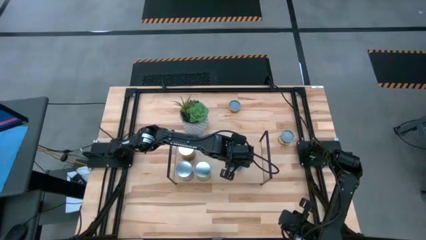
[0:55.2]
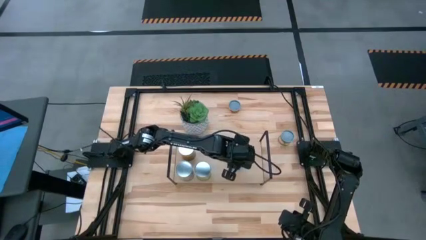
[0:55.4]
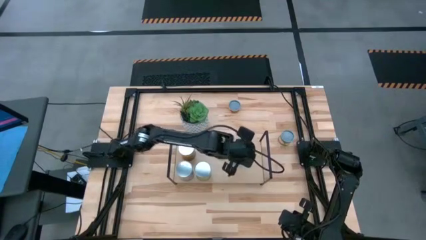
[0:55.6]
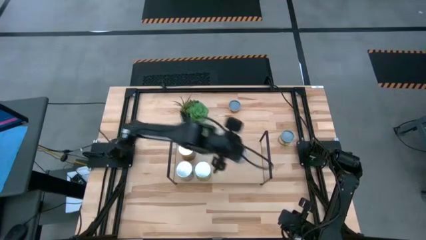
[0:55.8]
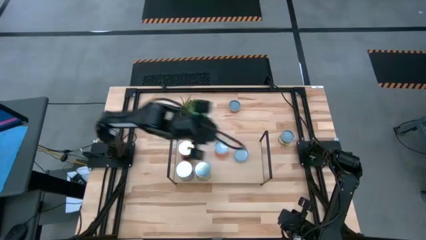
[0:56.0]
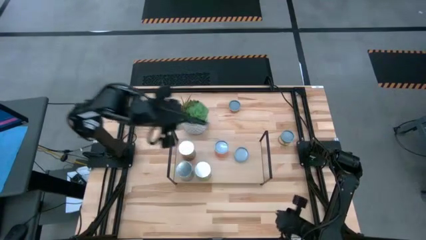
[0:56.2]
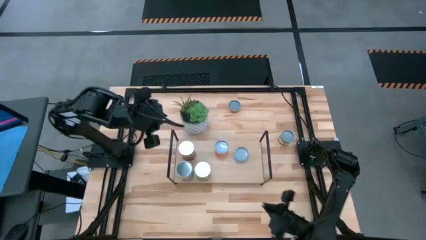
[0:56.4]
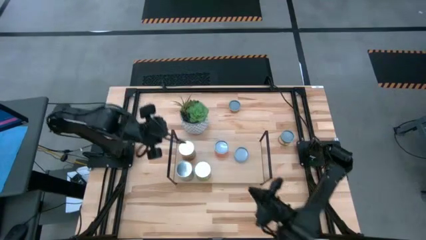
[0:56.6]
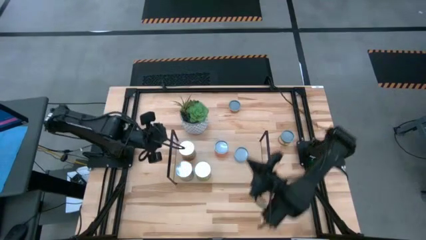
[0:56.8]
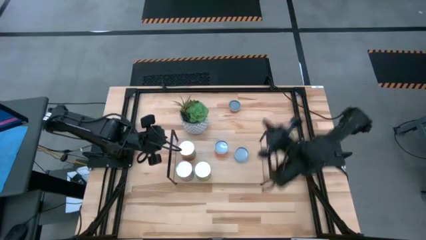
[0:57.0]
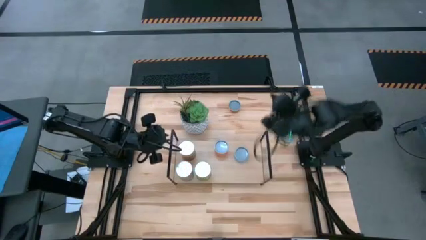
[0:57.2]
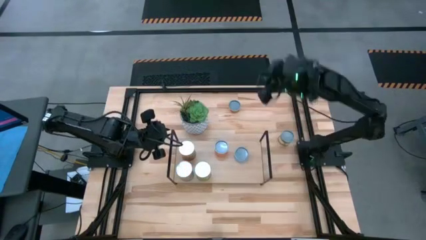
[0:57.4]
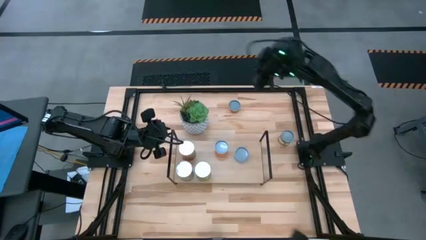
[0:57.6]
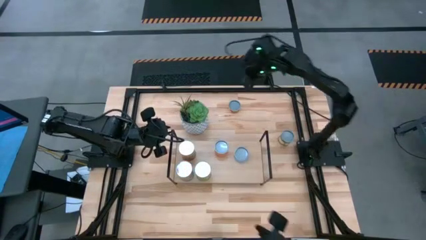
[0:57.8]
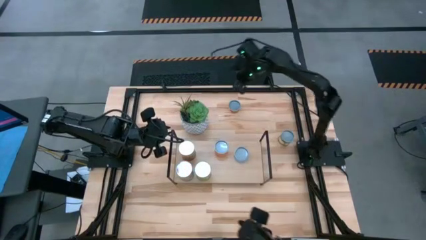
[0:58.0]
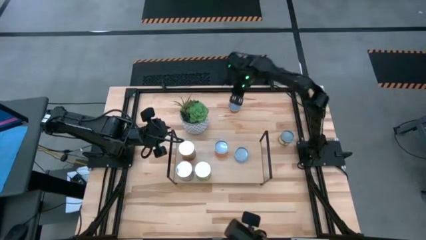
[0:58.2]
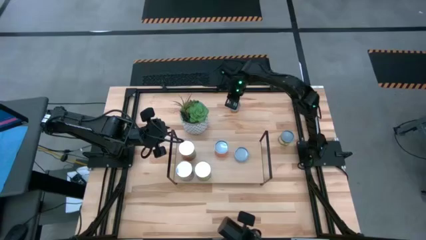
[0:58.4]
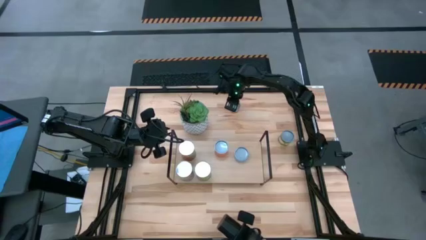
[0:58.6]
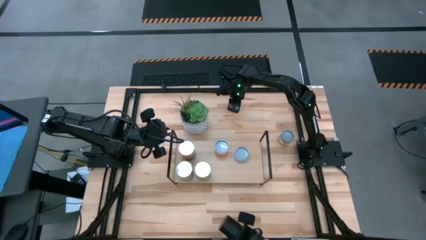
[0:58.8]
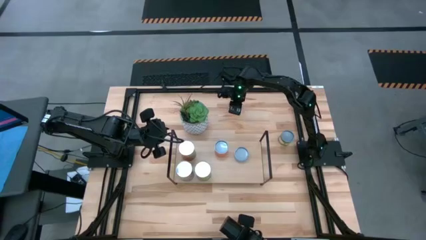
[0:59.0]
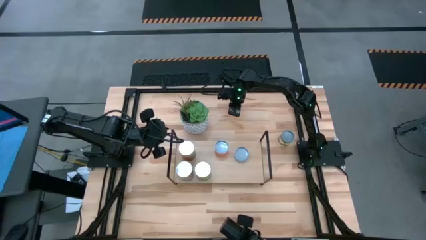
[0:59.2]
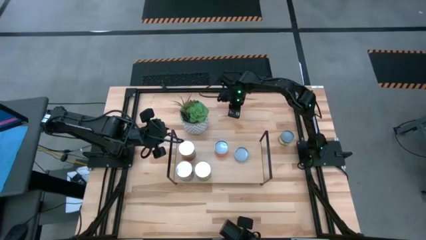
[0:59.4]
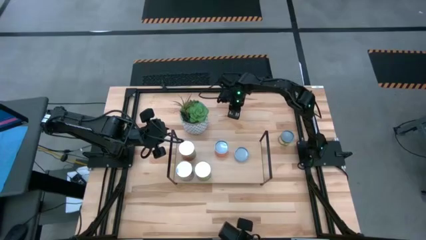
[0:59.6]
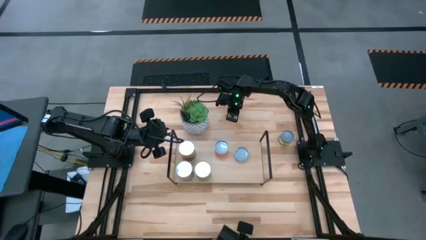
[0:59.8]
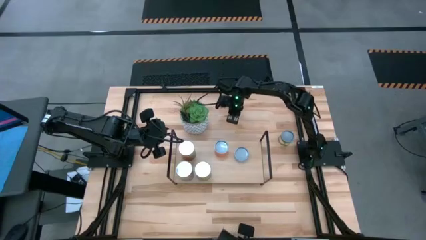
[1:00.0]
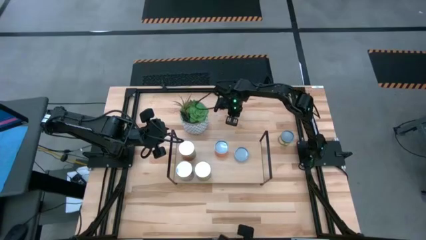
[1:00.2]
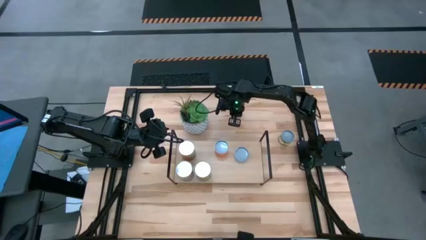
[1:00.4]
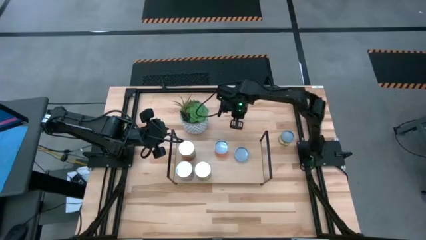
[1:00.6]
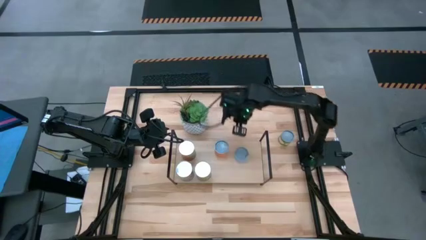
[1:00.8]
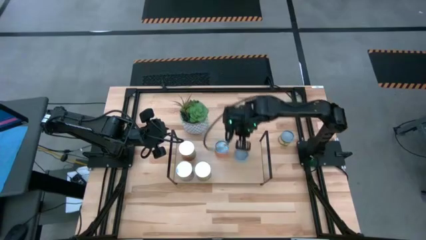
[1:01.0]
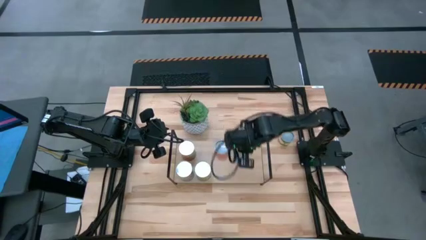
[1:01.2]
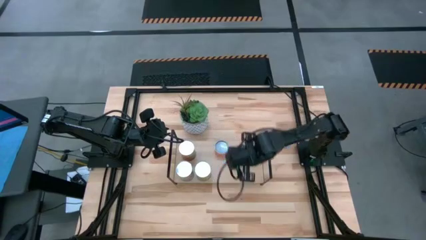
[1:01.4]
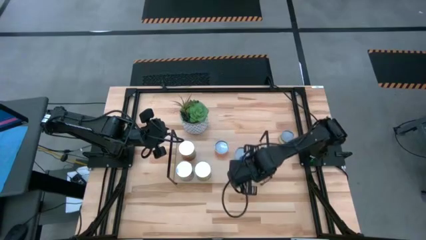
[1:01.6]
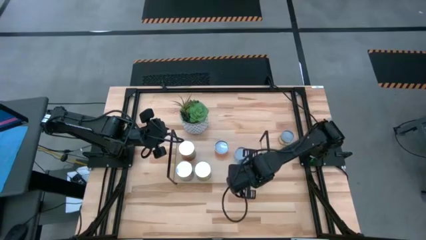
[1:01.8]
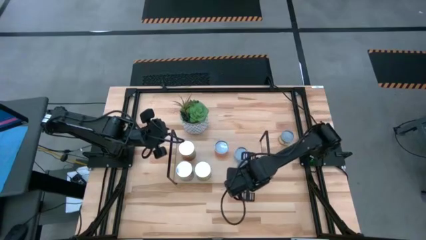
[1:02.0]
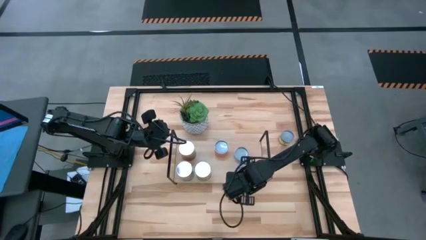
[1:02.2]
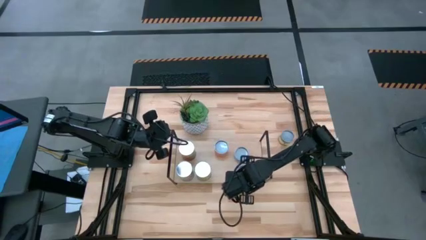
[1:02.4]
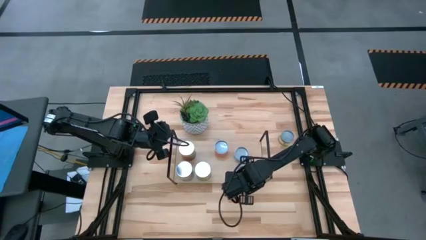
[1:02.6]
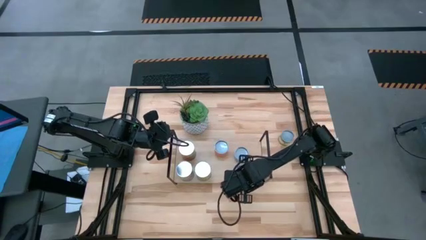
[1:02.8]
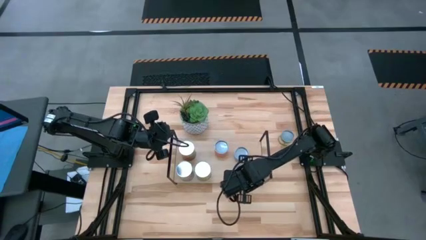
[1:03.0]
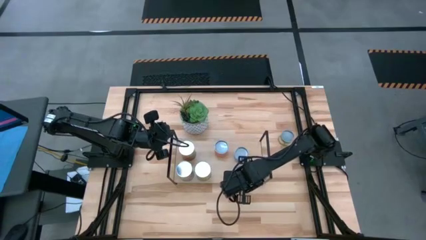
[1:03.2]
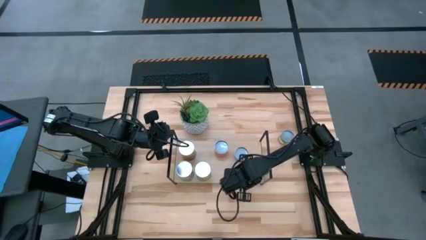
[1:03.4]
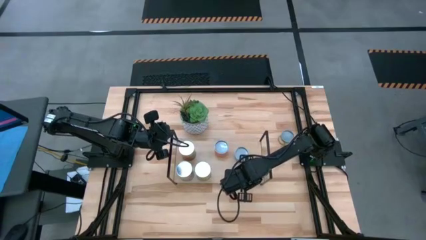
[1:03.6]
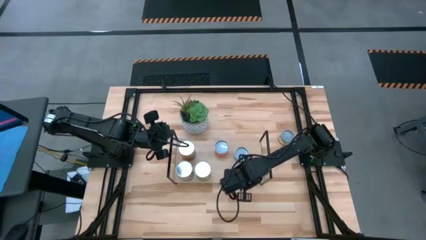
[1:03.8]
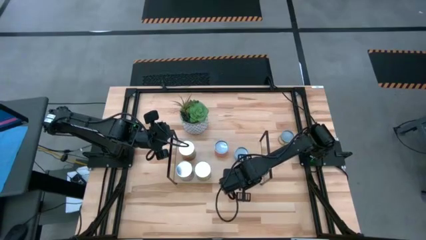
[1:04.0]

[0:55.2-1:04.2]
Task: Pick and place cans onto a shelf
Put the canned pineapple rings on the shelf

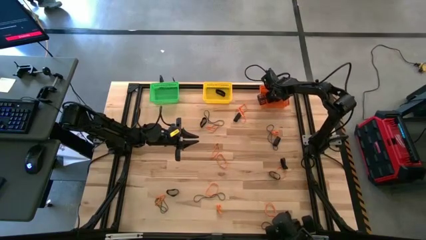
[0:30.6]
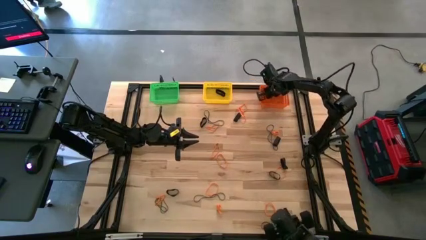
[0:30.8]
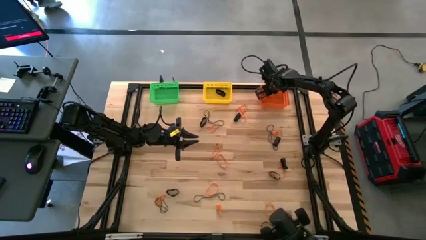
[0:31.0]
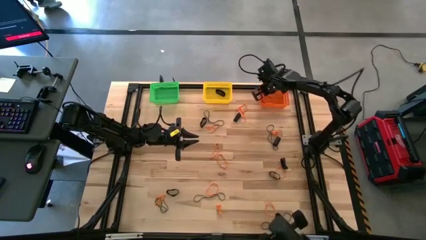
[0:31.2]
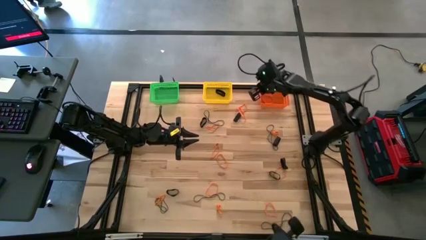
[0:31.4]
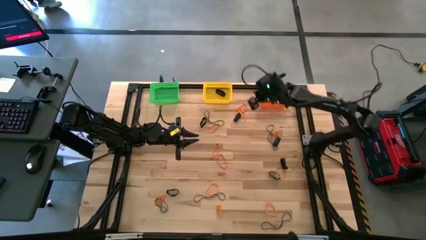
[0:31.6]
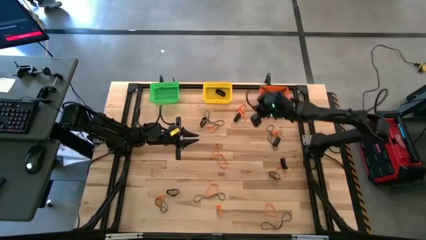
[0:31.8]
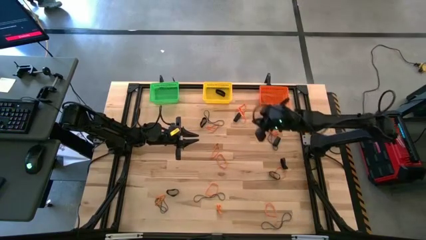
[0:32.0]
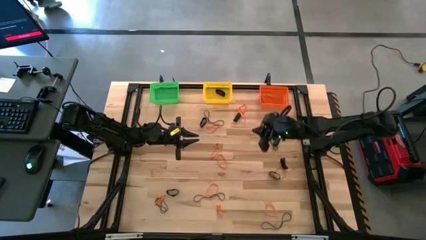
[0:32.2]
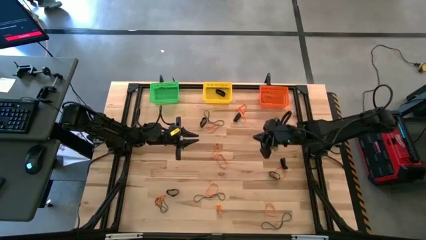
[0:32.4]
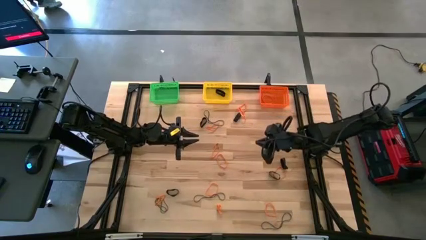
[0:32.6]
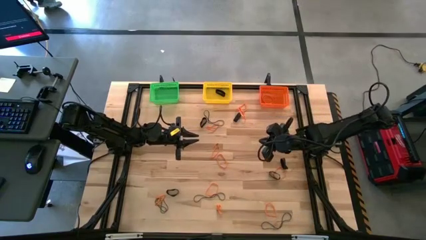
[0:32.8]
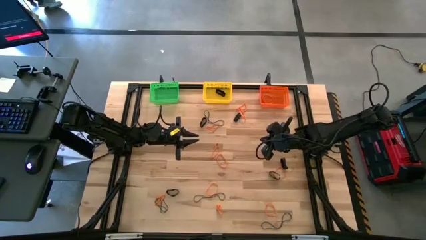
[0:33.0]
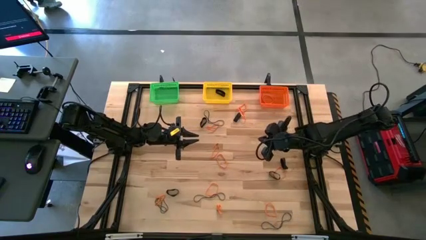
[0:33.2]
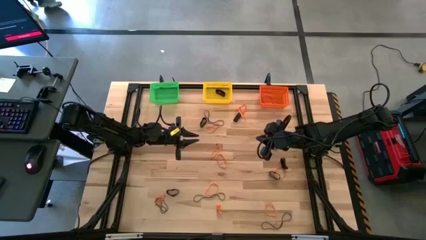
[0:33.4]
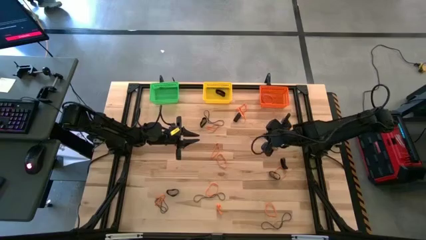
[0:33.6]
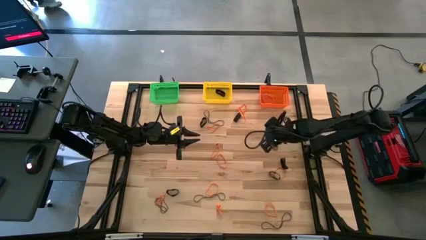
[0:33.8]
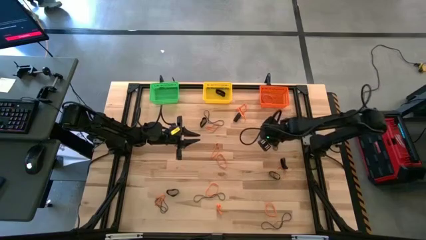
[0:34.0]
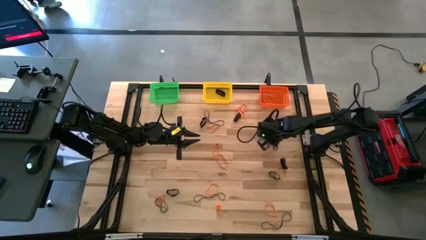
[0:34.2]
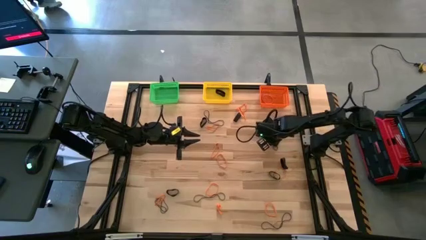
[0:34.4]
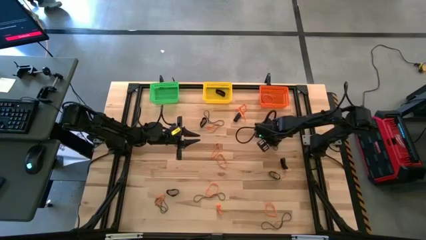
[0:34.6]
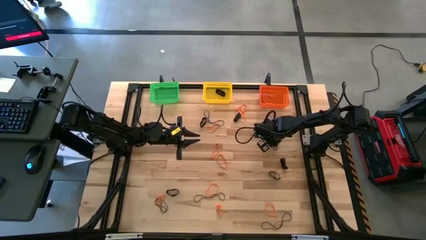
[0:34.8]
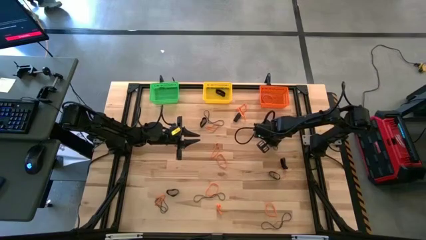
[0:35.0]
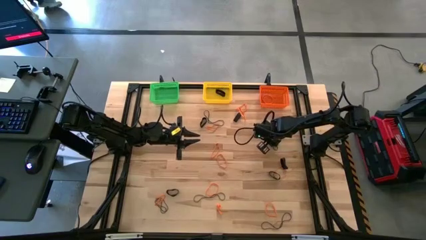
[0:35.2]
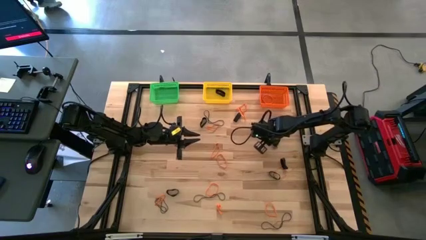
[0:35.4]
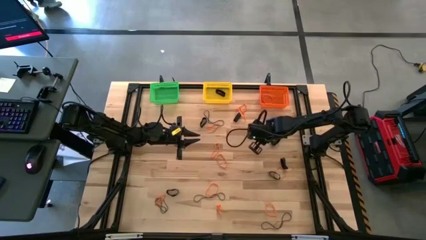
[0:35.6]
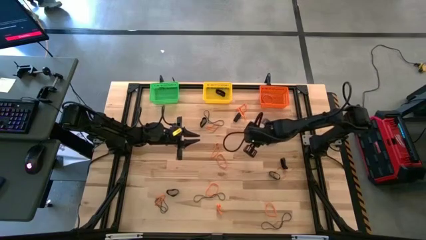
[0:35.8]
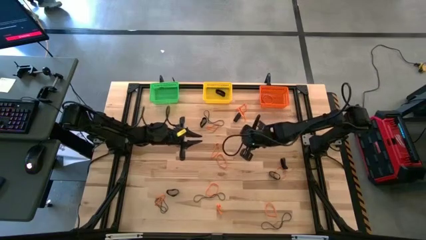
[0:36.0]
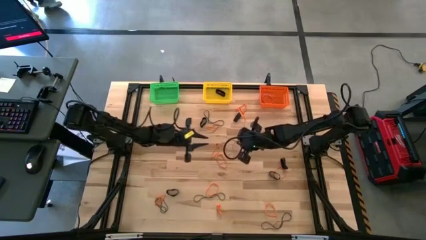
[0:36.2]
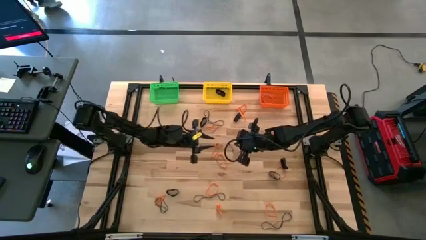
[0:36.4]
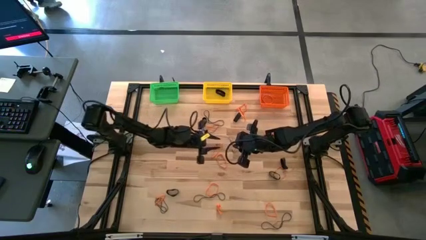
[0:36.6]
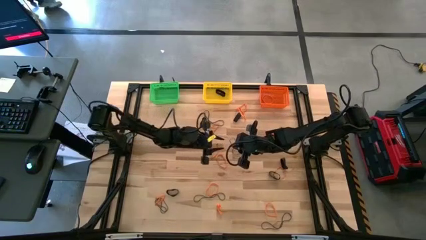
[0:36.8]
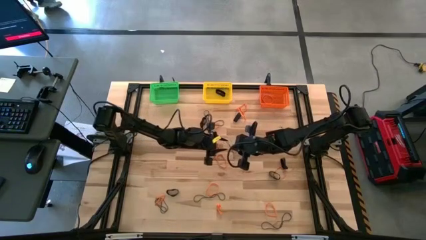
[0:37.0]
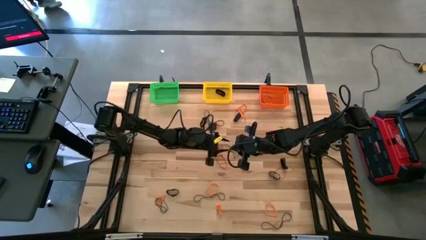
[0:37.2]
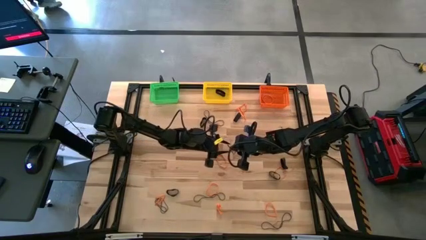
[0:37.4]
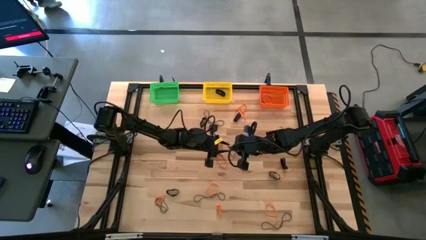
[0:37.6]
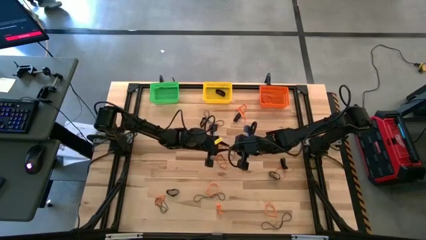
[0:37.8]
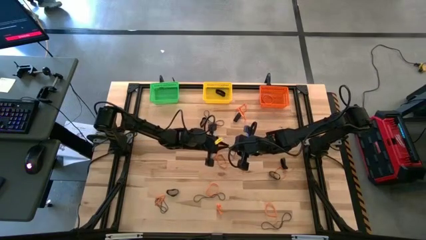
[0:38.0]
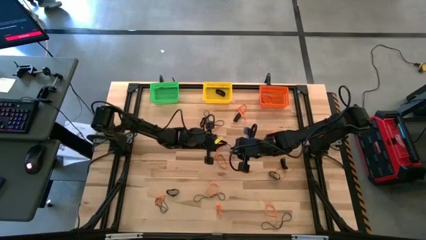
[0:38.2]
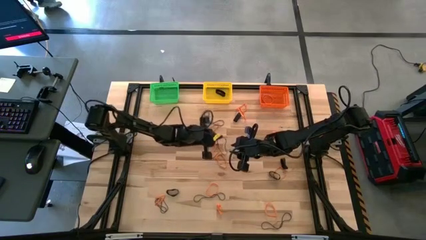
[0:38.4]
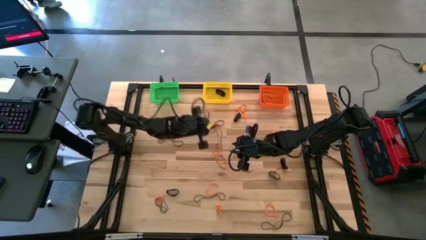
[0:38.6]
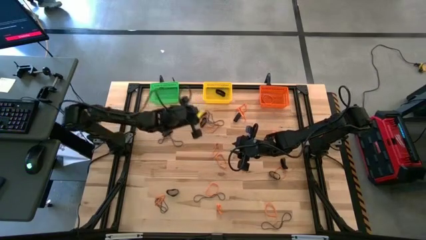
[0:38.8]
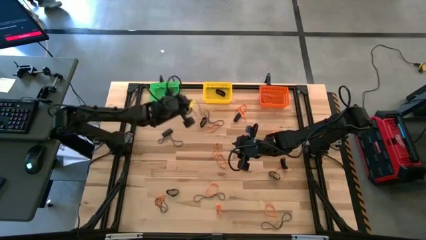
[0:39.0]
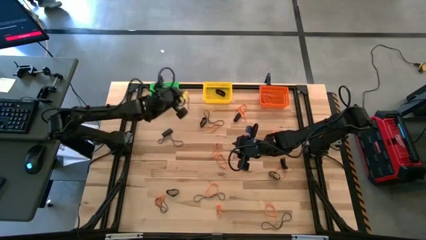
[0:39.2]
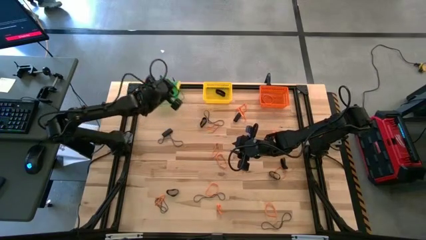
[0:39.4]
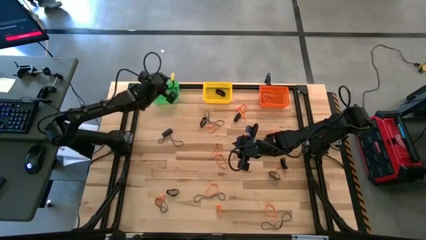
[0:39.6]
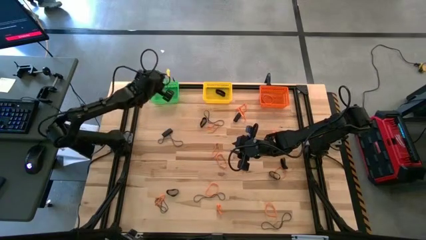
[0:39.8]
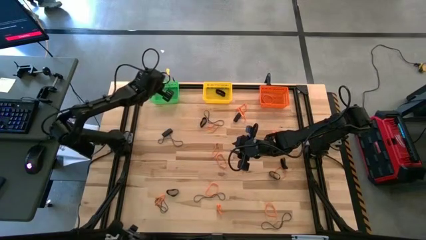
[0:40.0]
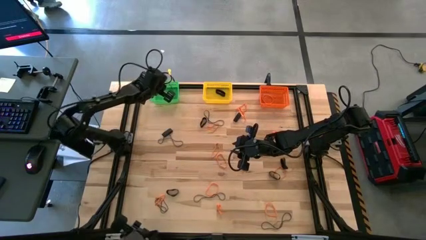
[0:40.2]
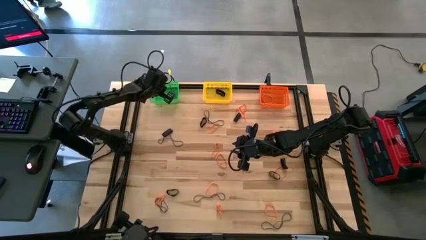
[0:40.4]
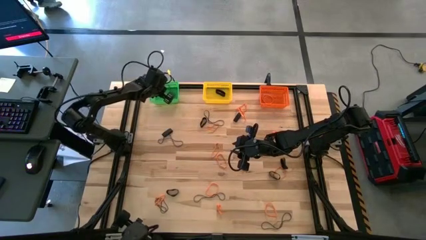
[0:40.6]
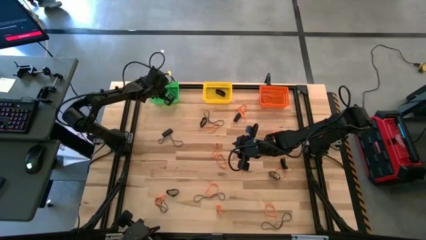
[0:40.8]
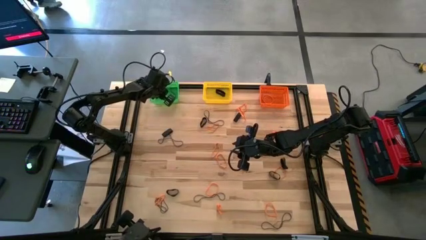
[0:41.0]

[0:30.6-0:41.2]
Task: Sort rubber bands into baskets
Put the purple rubber band into the green bin
